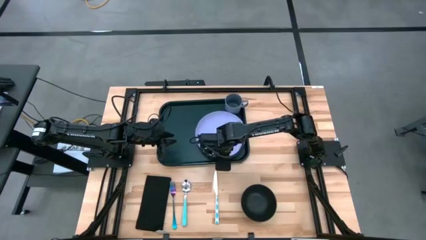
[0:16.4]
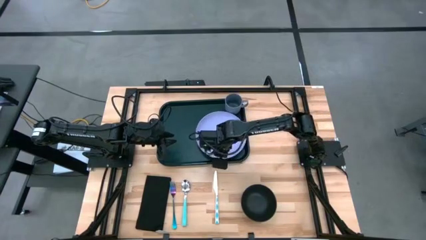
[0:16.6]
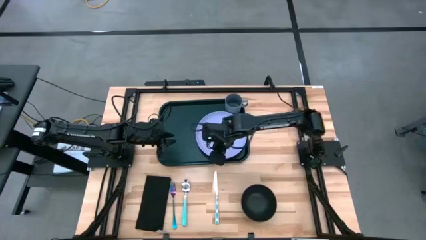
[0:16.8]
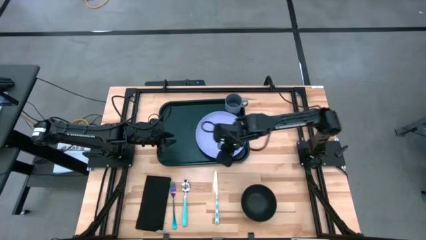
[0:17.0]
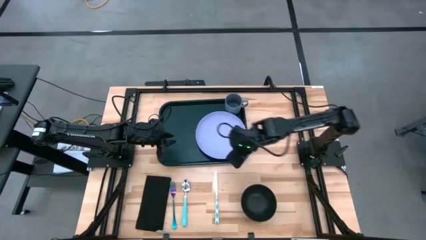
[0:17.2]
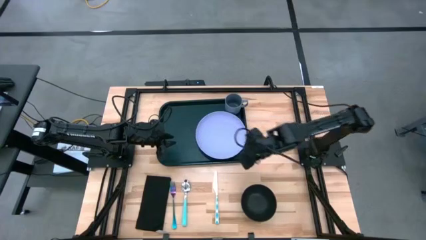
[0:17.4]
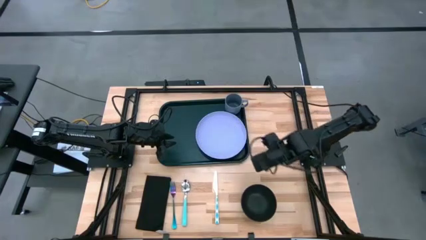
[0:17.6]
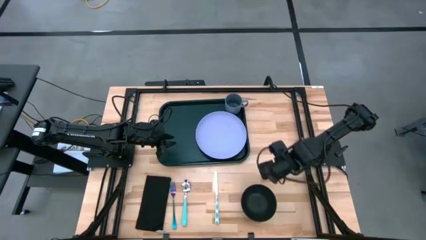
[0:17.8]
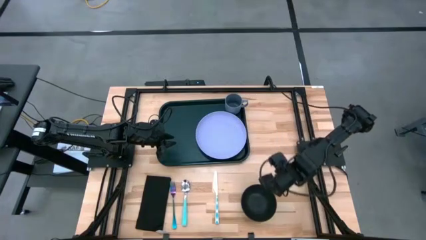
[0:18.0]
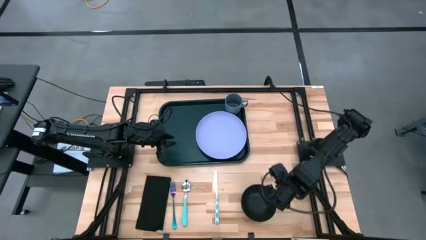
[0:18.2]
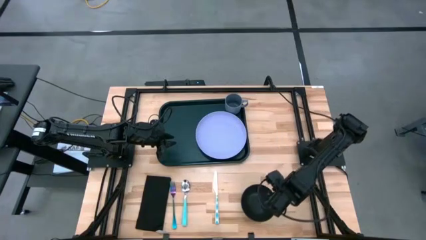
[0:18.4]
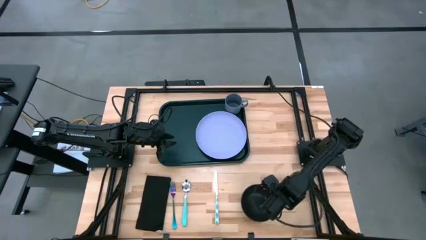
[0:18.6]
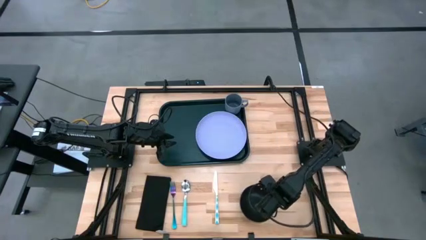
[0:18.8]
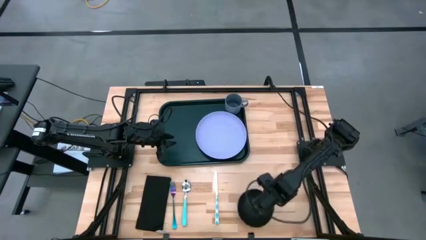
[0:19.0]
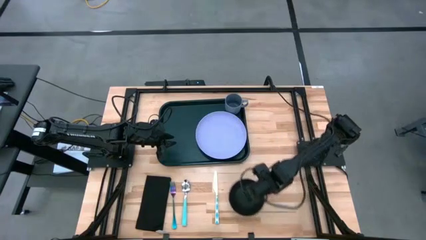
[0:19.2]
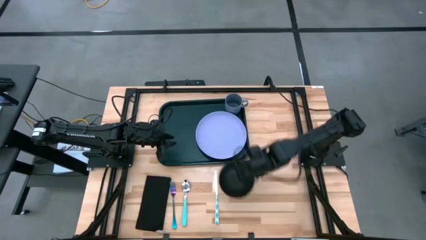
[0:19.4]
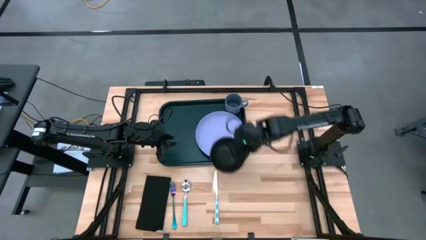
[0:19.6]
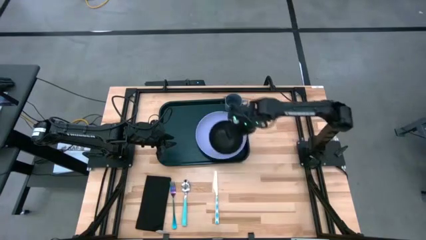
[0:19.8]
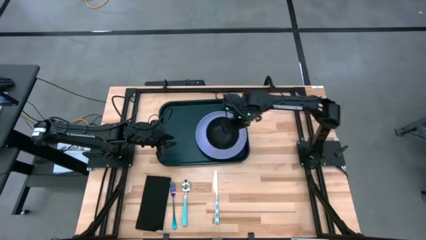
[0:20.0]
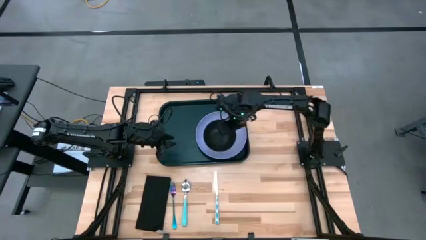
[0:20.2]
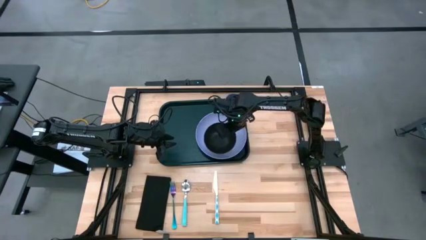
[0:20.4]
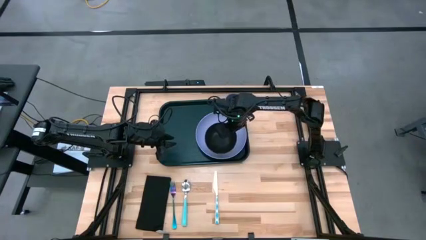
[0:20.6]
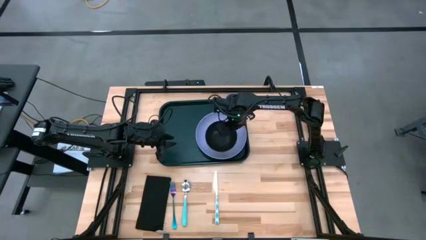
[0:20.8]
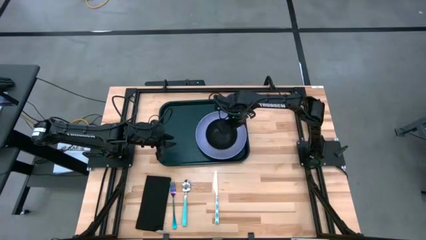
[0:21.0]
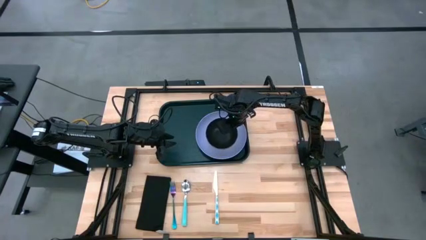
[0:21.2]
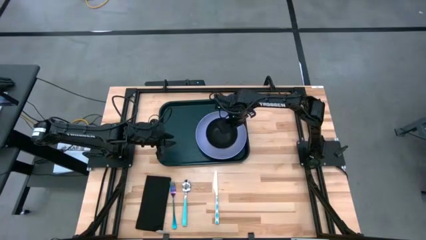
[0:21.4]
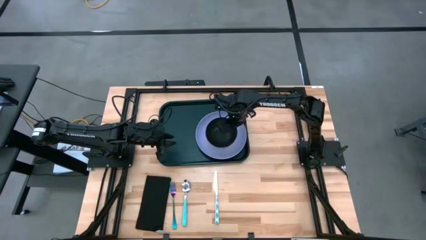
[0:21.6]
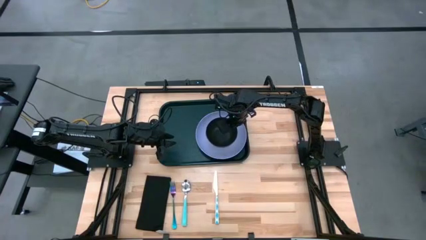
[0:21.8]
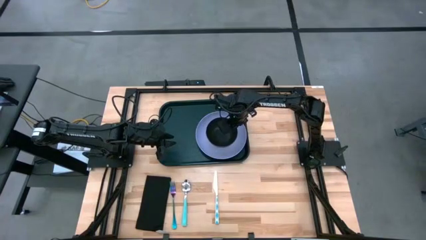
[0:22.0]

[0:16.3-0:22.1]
Task: Set up tray
Put the black bowl on top of the violet plate on the black serving tray

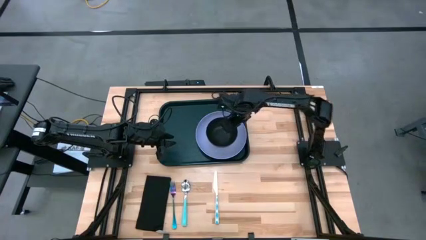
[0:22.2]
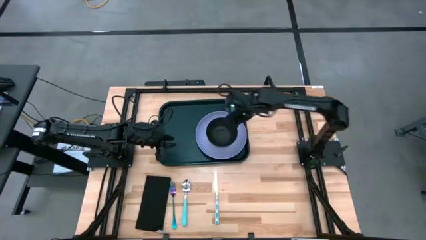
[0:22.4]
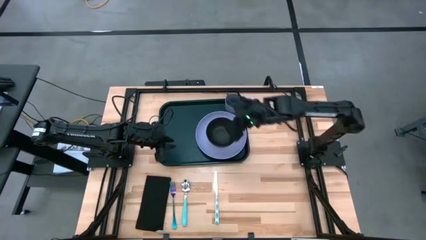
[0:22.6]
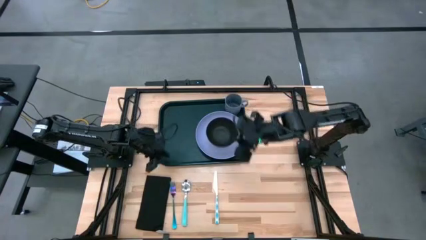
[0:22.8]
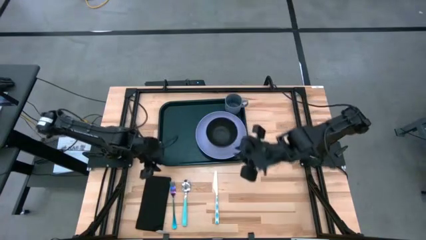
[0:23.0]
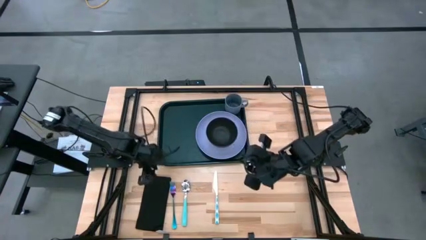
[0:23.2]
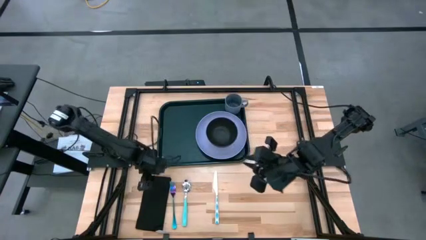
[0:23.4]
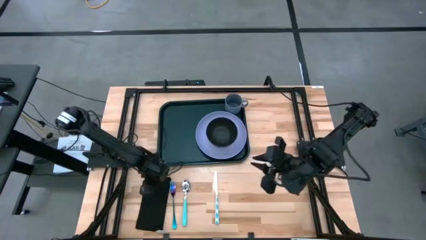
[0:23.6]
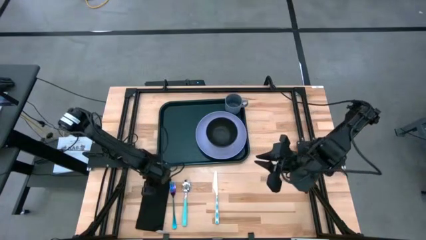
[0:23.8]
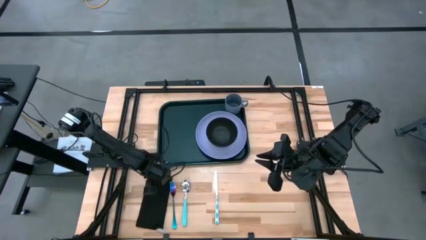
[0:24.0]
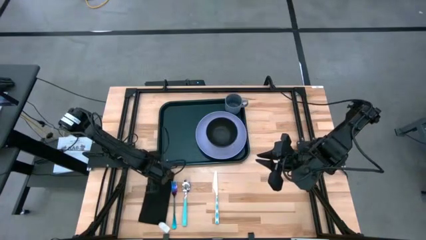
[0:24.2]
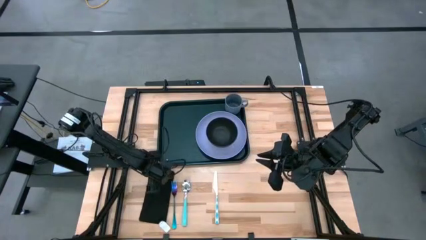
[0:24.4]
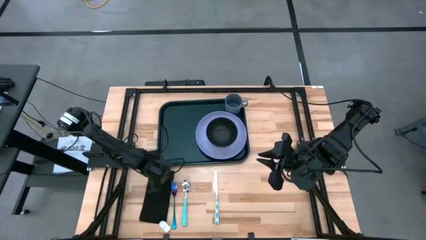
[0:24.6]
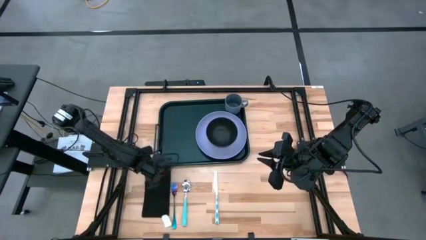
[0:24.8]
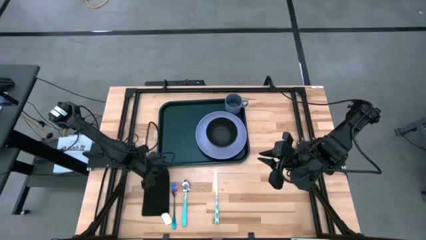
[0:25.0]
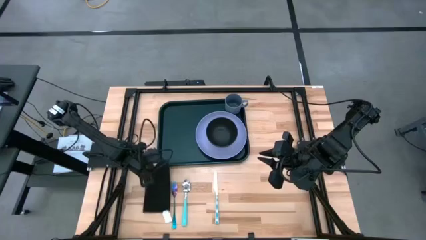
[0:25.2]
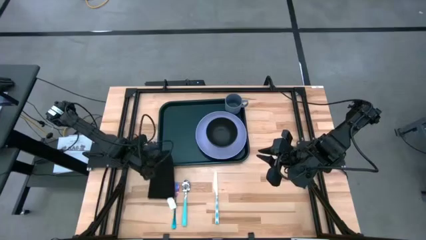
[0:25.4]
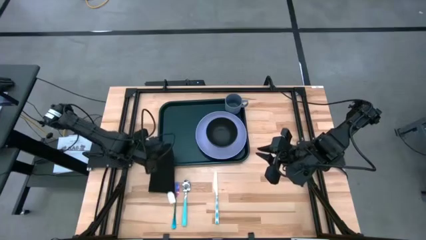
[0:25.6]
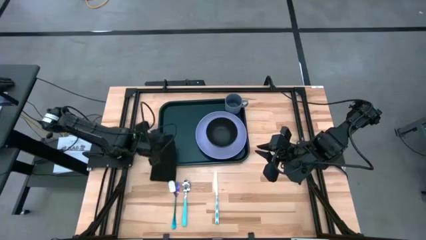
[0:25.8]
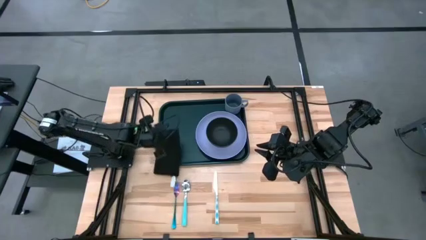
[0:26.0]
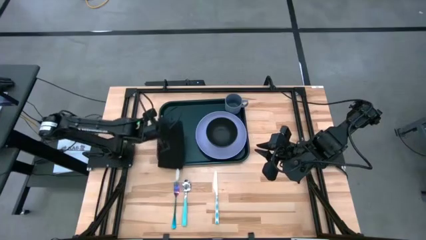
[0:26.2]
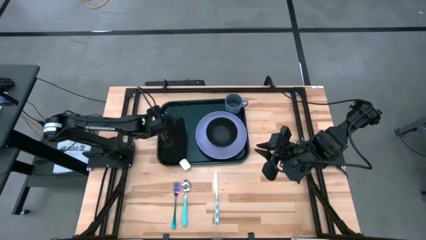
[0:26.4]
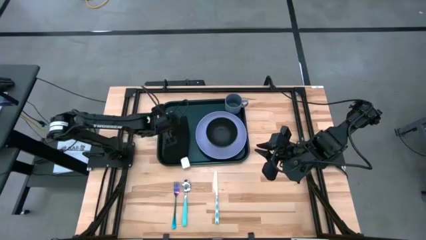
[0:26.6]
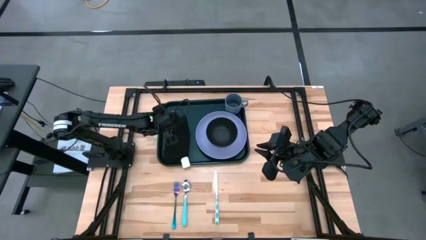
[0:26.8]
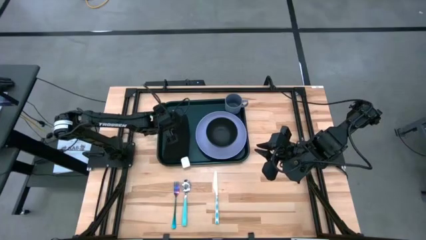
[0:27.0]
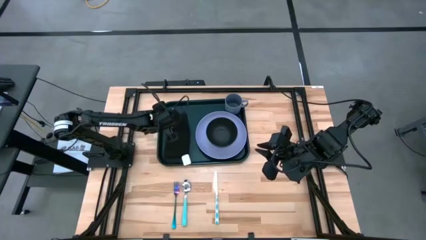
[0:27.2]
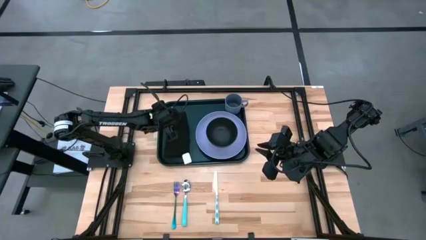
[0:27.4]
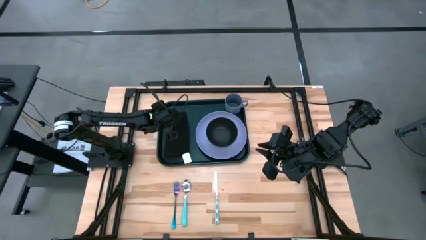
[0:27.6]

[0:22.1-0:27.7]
Put the black napkin to the right of the violet plate and black bowl on the black serving tray

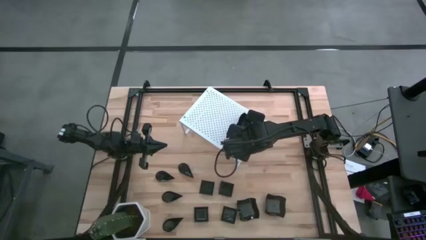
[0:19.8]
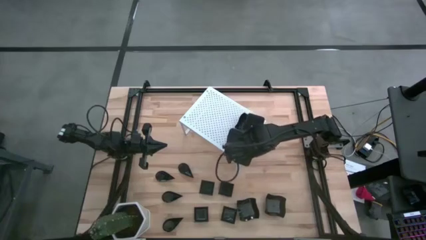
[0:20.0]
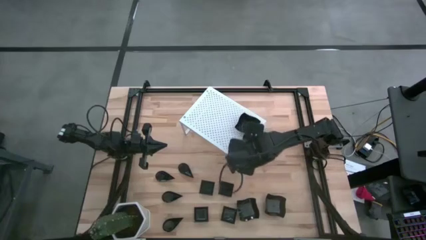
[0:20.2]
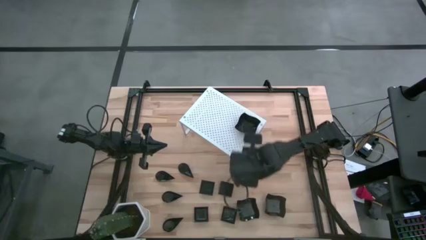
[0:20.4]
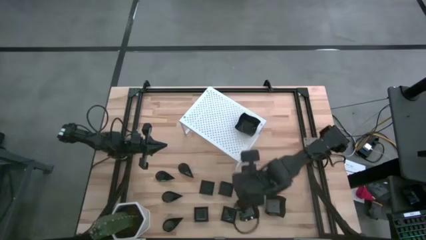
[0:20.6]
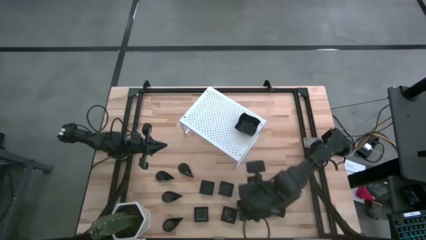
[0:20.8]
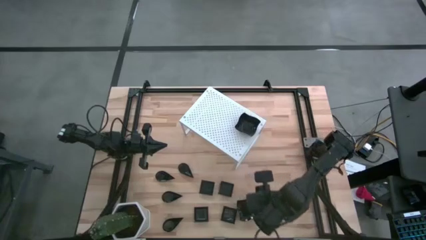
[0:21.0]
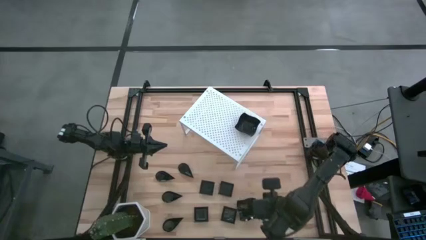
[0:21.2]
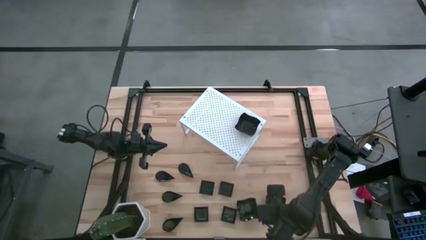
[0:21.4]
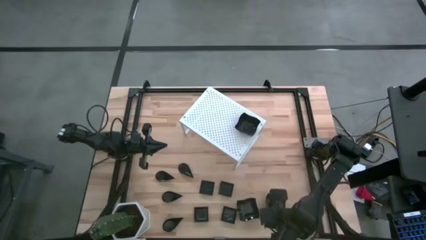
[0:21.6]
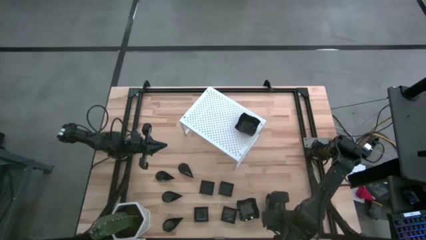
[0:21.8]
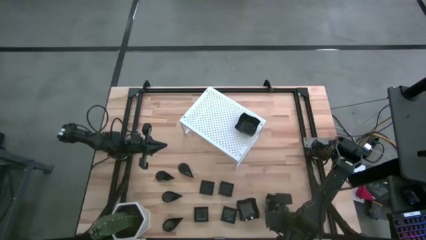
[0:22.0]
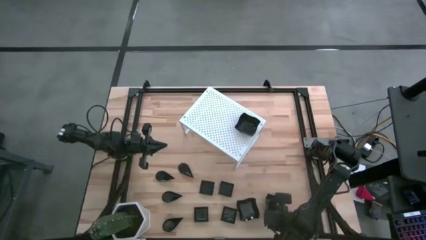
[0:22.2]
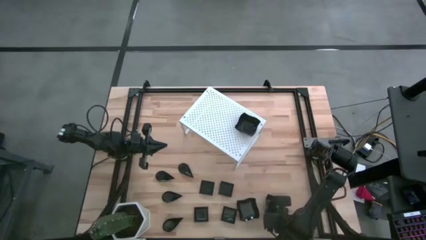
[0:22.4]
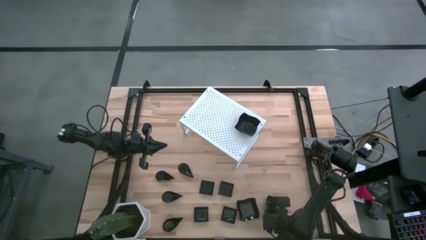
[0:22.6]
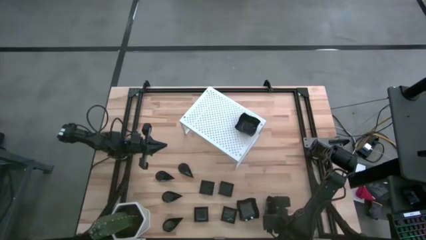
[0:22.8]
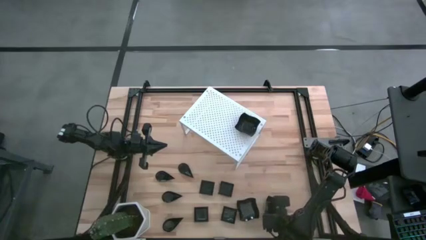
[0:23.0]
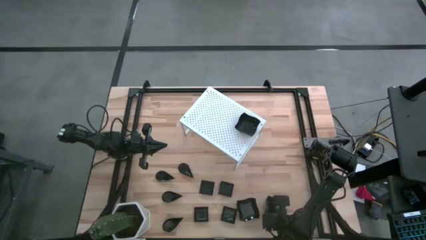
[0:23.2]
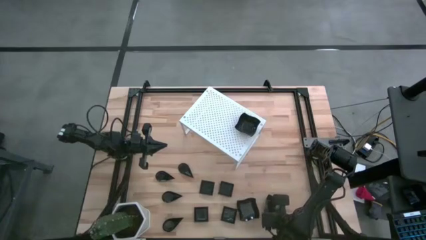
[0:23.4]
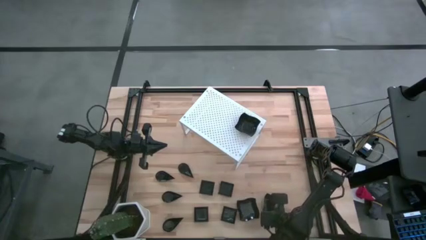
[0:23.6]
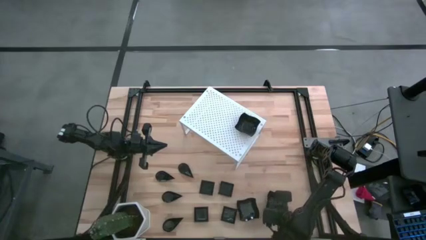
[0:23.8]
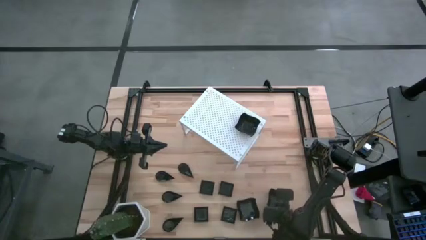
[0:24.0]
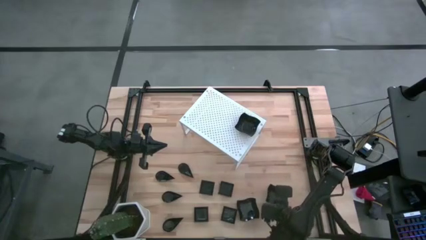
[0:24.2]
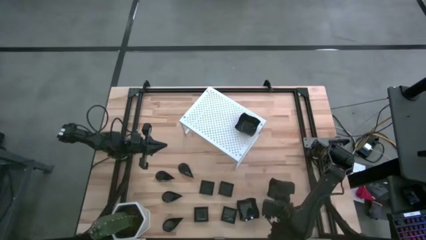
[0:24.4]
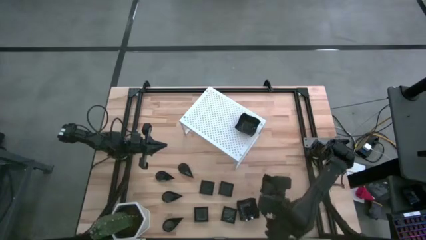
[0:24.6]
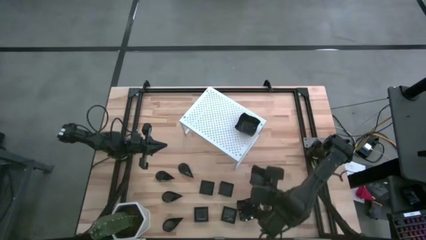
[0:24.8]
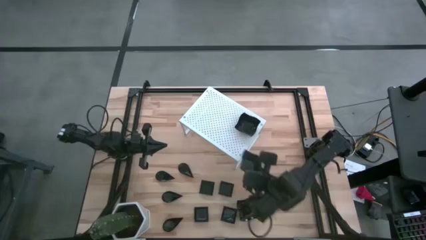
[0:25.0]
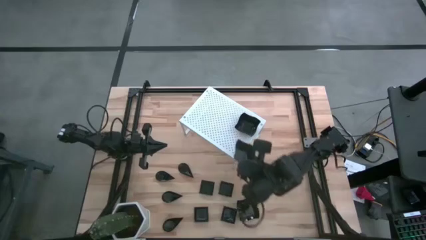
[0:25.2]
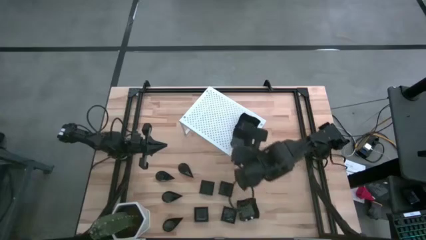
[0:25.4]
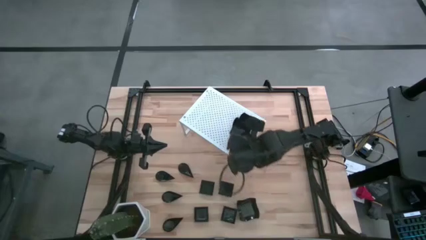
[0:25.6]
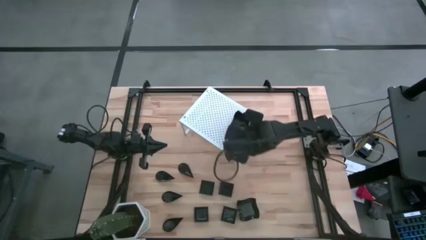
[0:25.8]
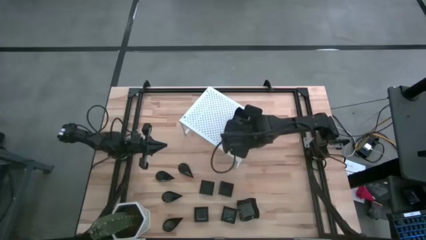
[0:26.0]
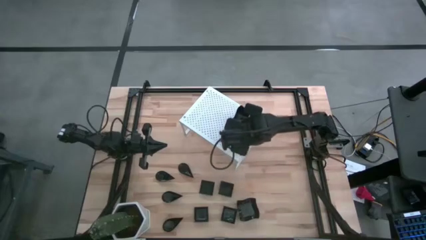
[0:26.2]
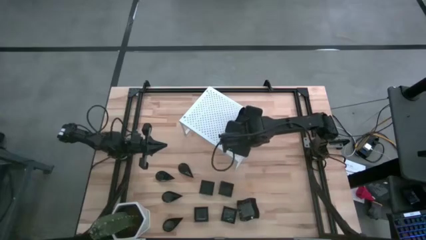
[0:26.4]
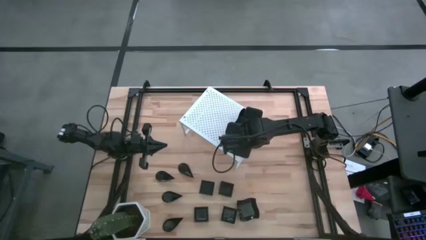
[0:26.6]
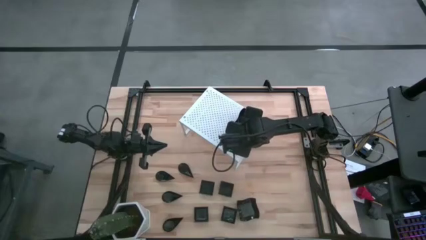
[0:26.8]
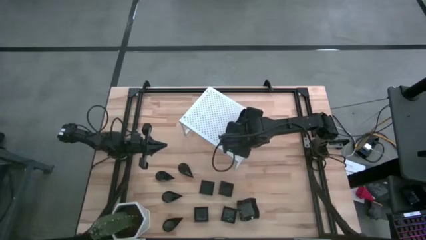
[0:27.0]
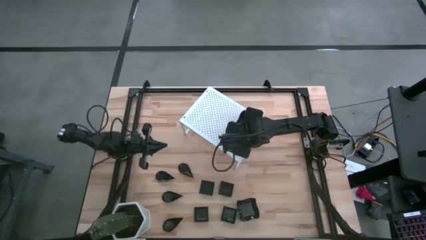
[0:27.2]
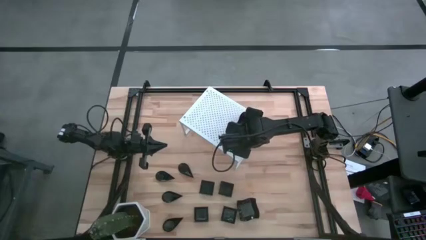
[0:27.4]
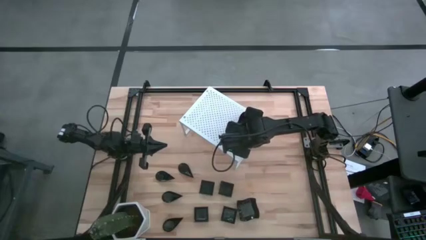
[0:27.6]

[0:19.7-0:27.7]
Task: Pick & Place Mini shaped plates
Stack the distorted square plate on top of the other distorted square plates on the shelf
